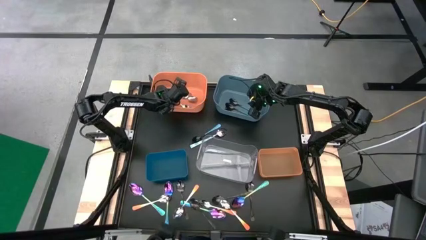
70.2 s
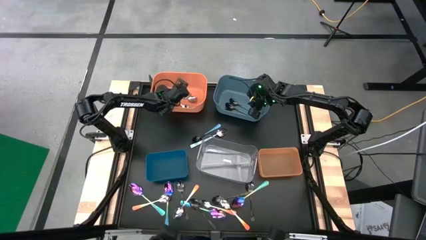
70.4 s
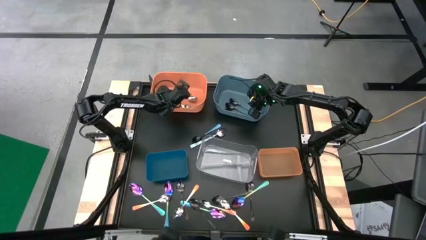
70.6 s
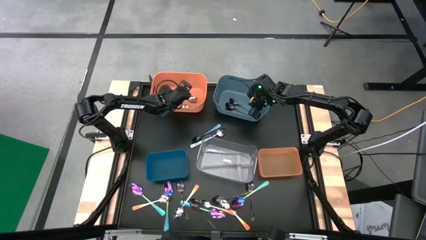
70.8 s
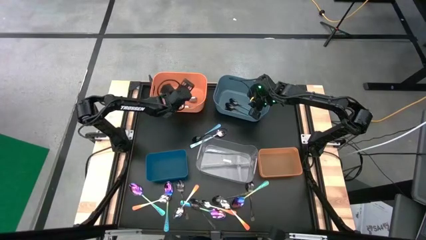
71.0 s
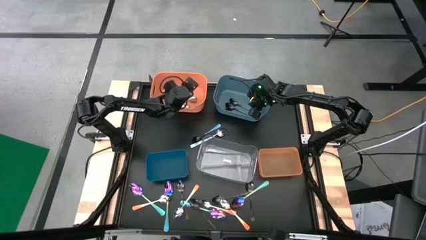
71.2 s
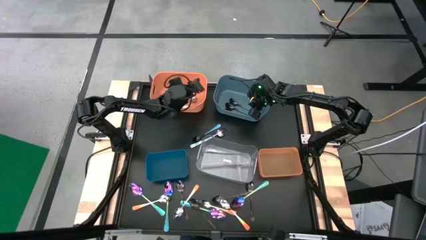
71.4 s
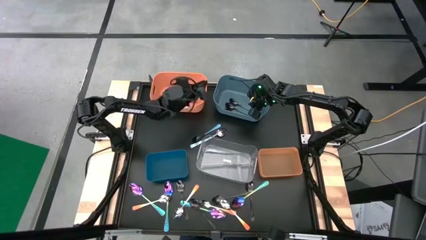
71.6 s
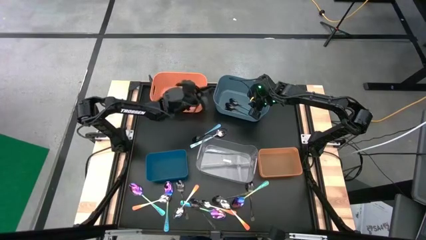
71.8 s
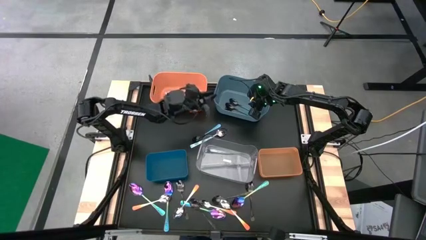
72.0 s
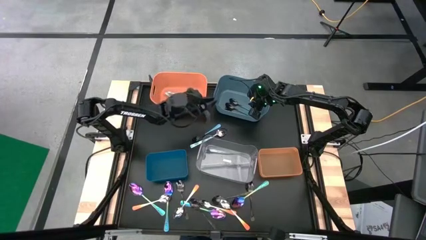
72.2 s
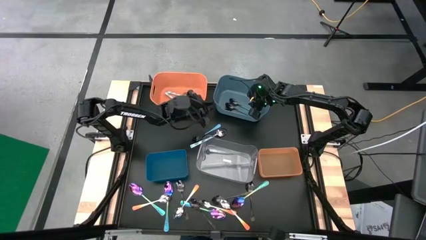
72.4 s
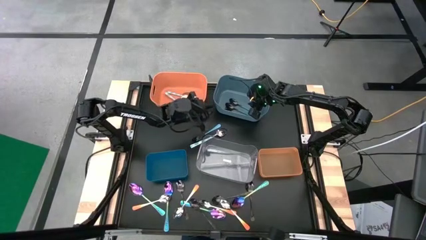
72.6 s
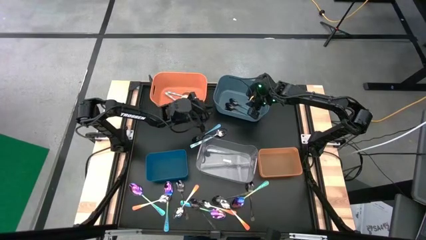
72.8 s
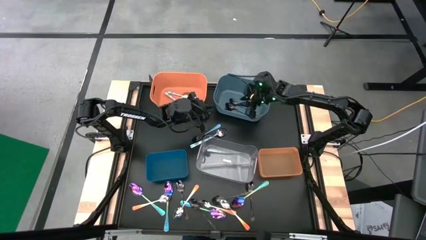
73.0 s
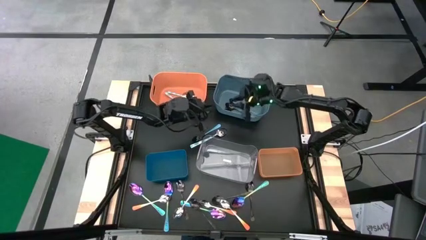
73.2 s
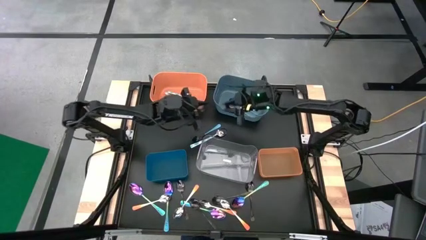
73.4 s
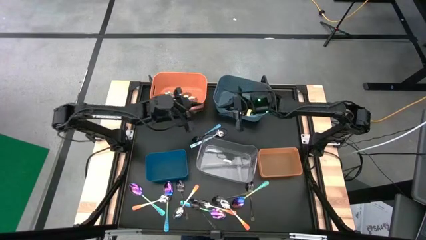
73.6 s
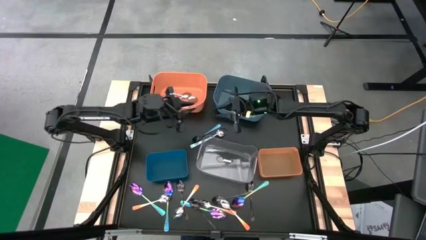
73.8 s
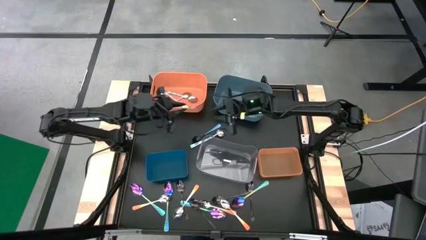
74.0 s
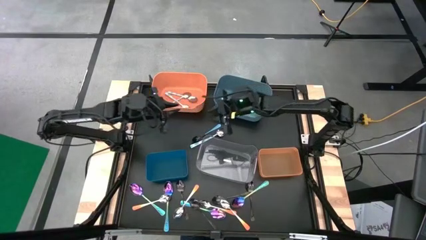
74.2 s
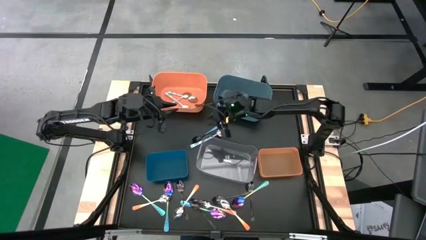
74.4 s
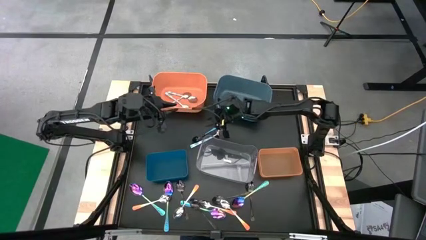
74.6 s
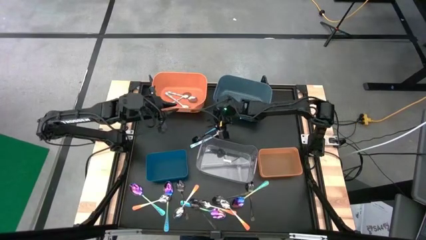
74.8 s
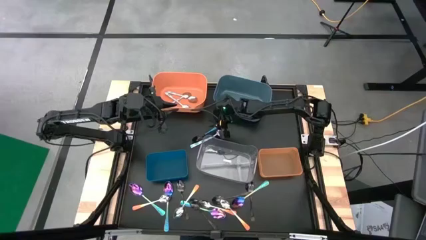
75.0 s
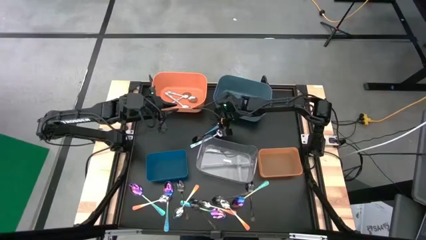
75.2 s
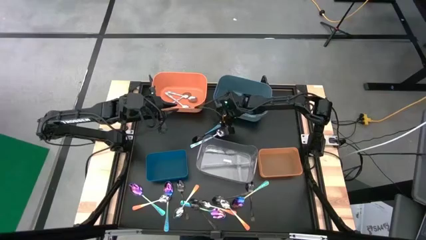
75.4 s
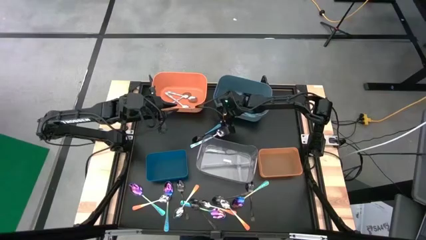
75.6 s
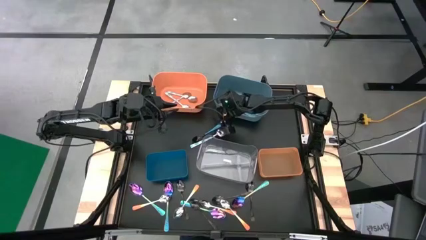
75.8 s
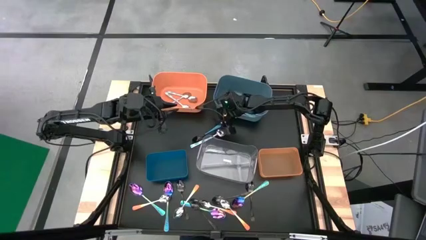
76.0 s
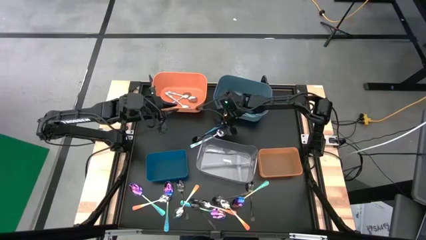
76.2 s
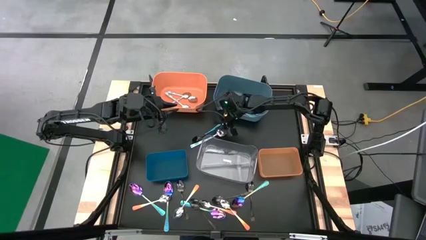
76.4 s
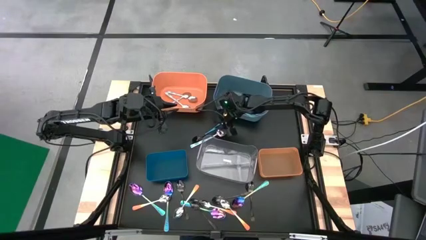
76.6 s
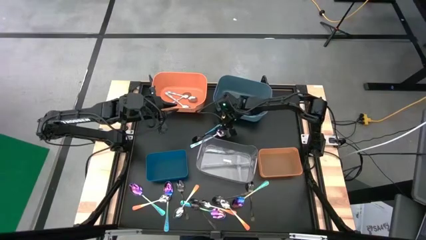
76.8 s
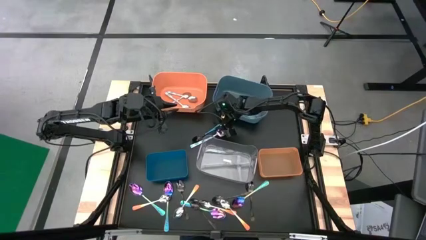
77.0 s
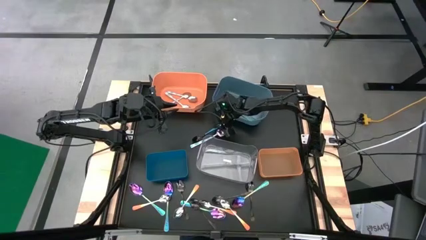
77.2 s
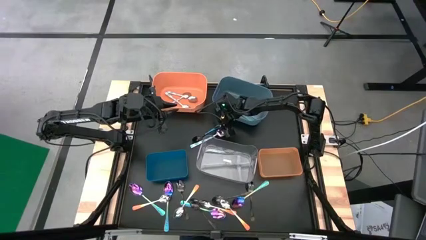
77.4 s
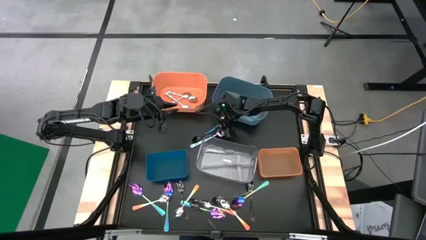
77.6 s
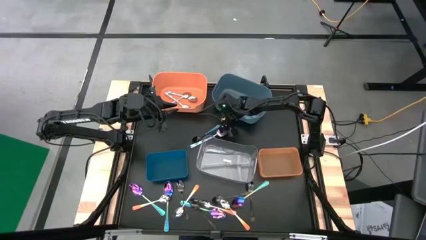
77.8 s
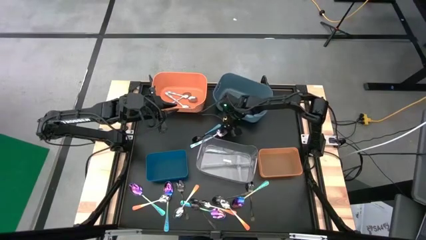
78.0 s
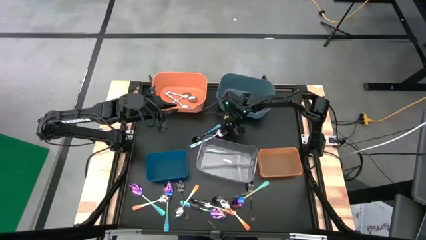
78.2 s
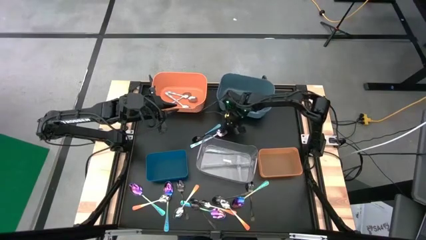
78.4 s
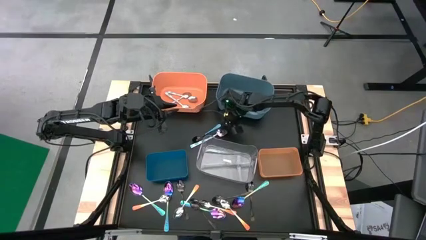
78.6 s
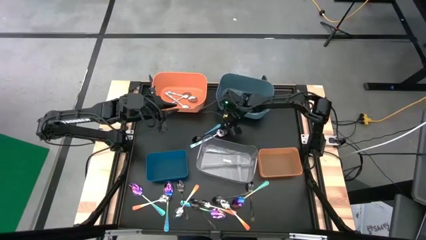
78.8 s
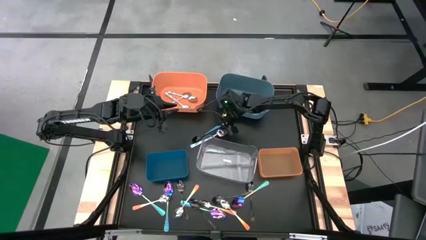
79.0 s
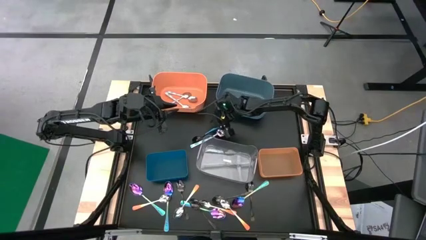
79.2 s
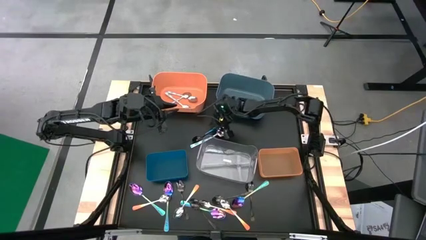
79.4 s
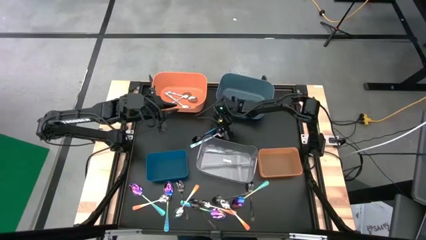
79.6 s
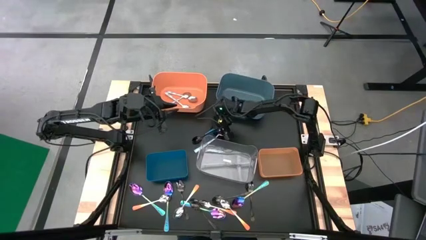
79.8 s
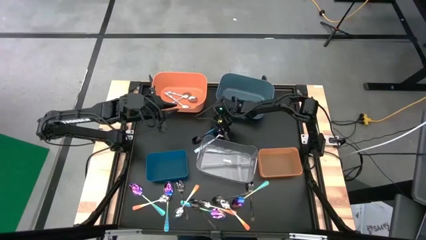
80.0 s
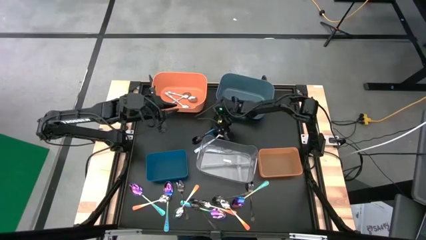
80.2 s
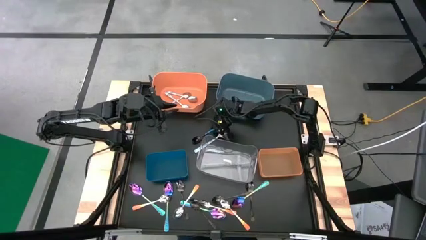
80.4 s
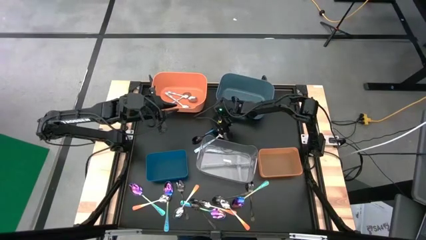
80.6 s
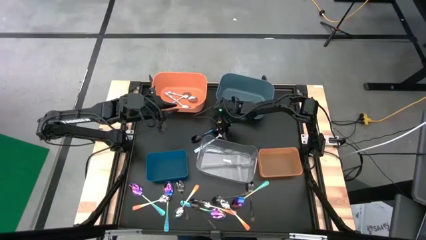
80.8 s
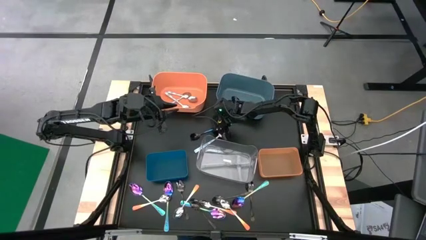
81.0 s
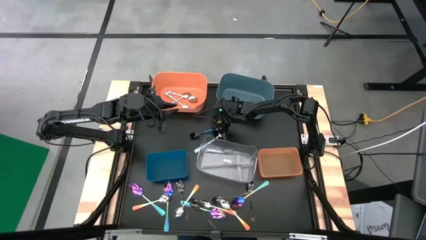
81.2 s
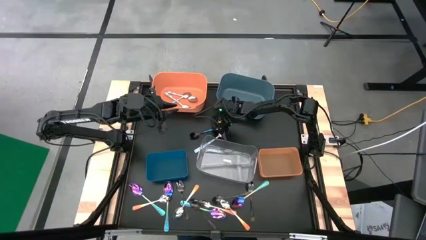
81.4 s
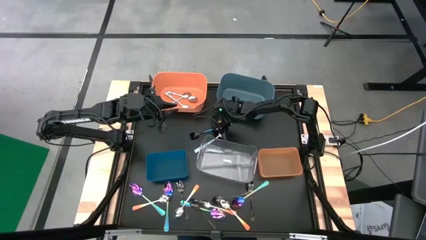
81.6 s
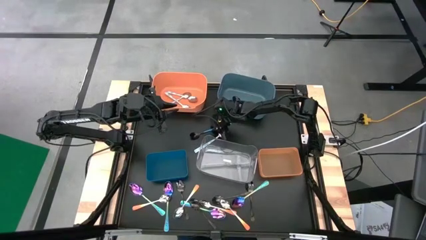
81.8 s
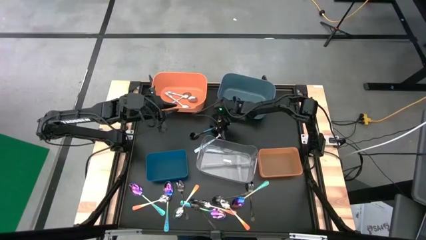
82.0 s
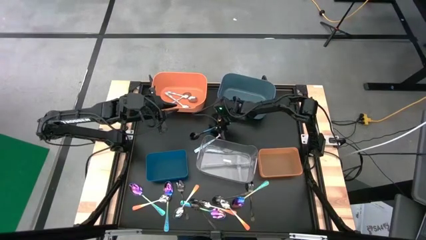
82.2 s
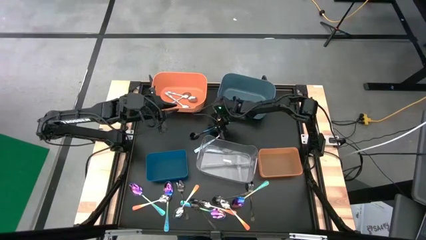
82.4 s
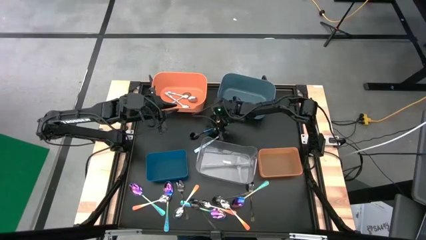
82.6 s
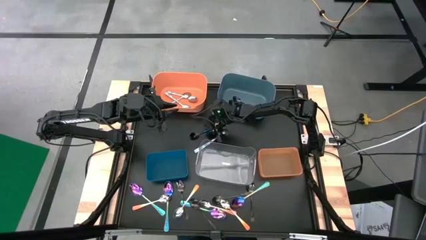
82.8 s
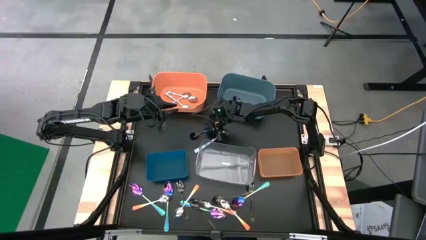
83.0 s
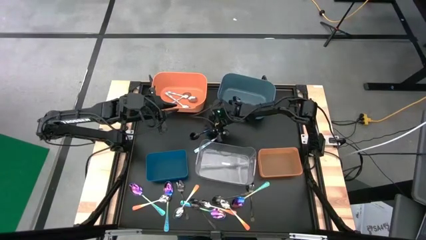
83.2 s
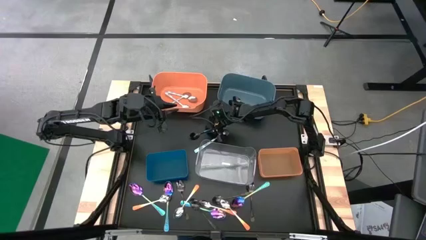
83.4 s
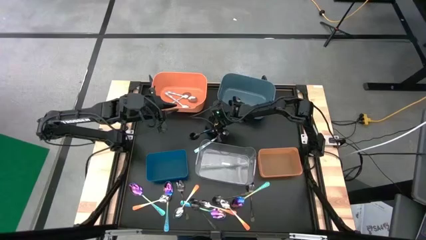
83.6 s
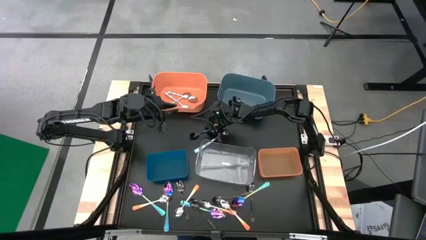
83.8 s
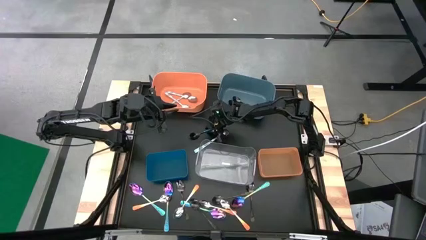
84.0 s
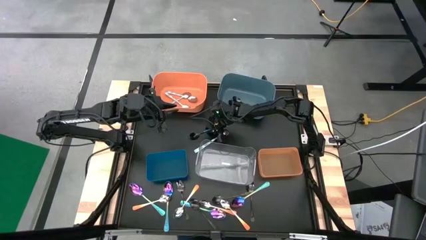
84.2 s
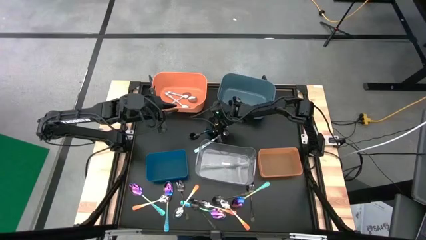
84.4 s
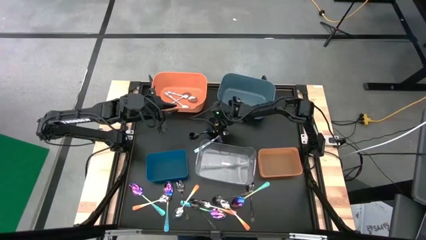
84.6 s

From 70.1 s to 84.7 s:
Task: Sort silverware by color (type)
Put the blue spoon into the light blue bin

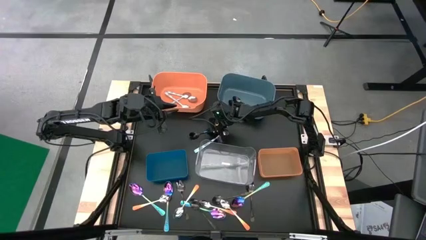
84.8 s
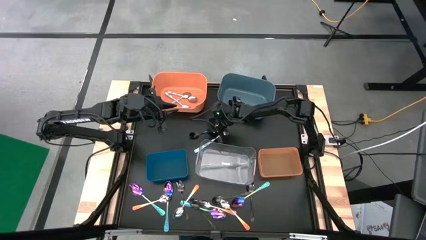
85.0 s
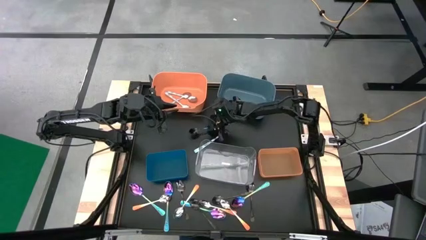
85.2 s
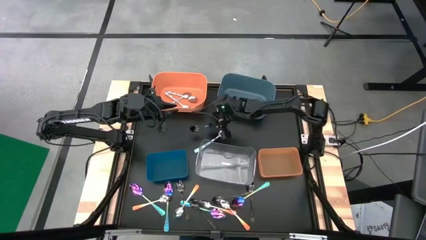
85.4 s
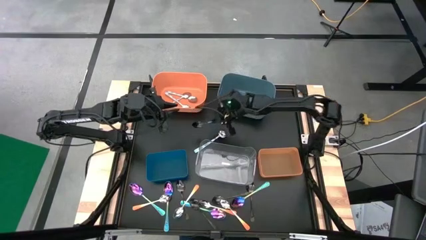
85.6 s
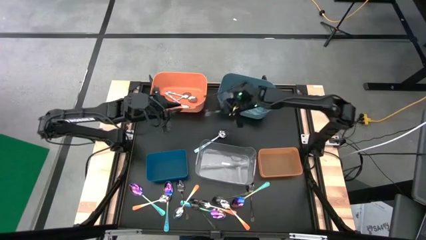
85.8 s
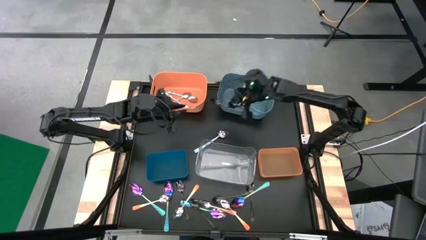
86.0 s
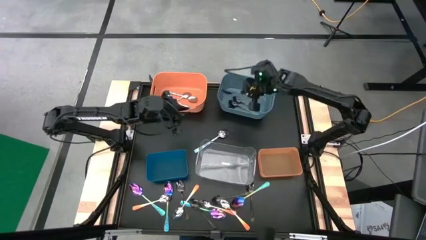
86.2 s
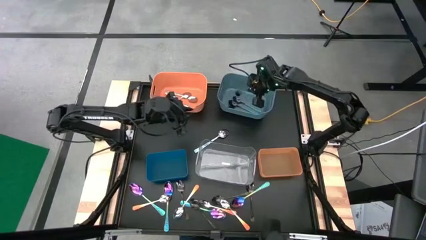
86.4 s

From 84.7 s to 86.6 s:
Put the blue spoon into the light blue bin
